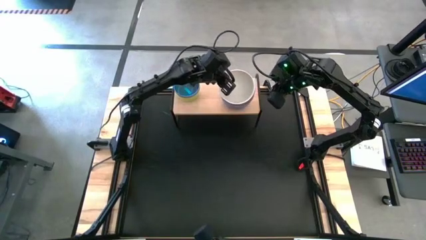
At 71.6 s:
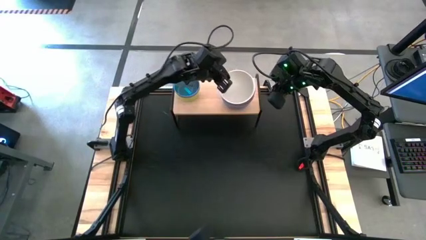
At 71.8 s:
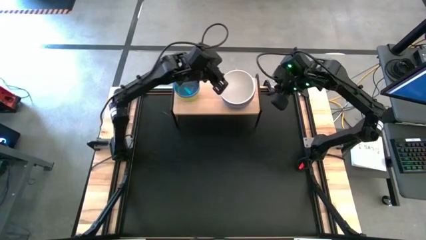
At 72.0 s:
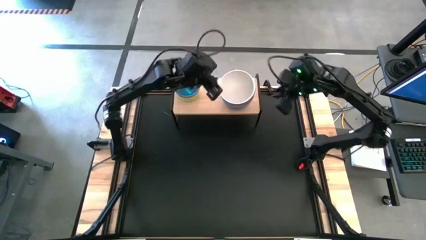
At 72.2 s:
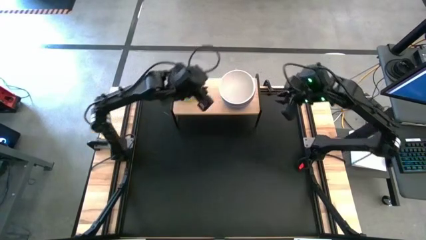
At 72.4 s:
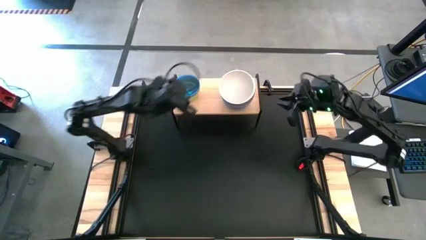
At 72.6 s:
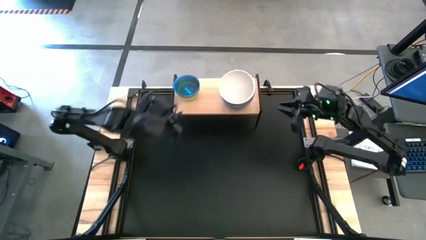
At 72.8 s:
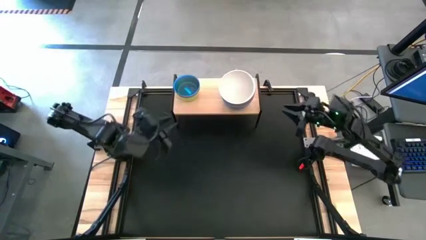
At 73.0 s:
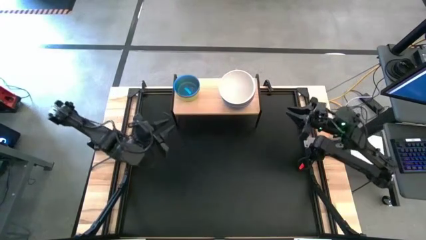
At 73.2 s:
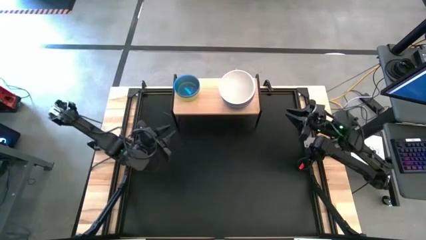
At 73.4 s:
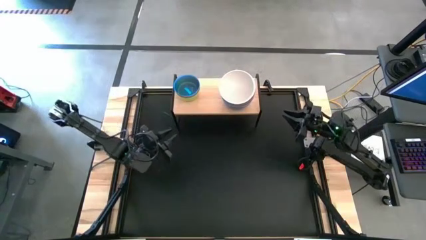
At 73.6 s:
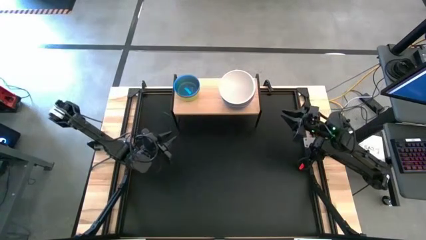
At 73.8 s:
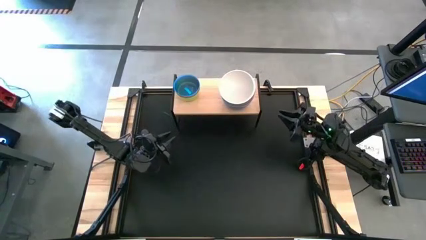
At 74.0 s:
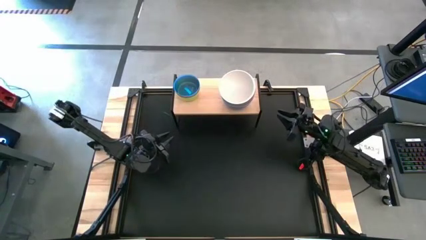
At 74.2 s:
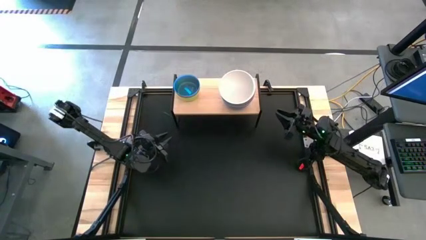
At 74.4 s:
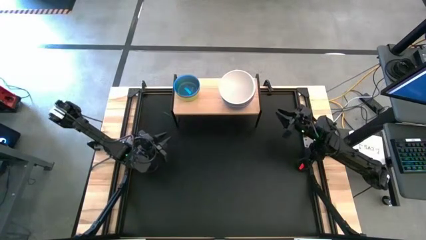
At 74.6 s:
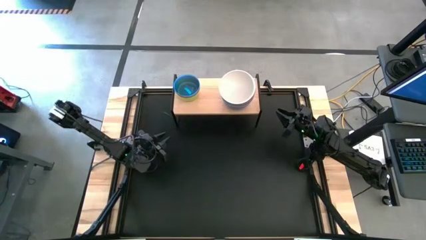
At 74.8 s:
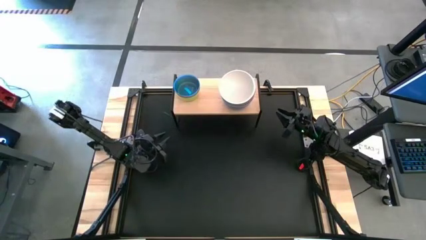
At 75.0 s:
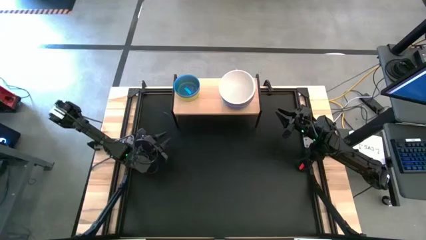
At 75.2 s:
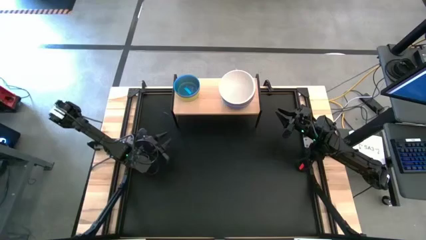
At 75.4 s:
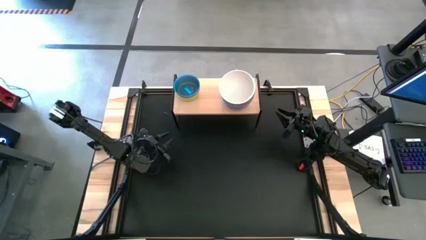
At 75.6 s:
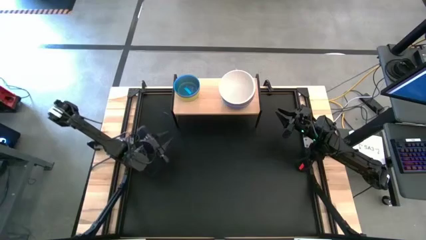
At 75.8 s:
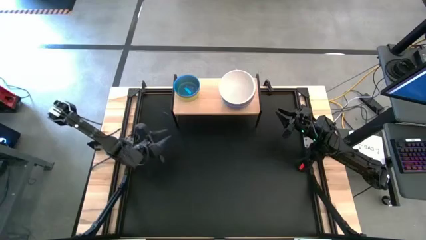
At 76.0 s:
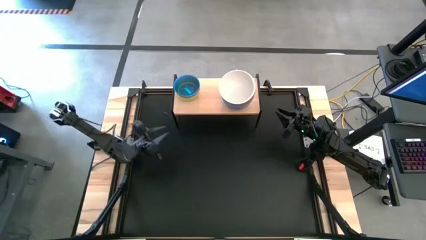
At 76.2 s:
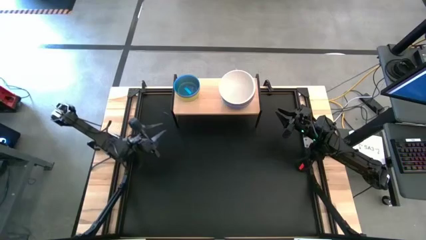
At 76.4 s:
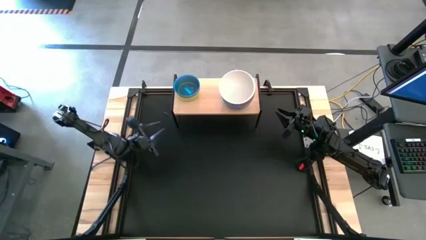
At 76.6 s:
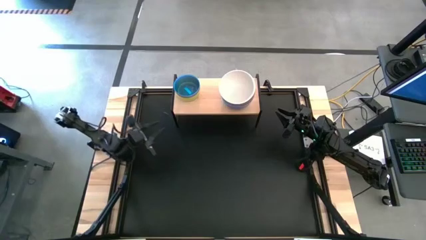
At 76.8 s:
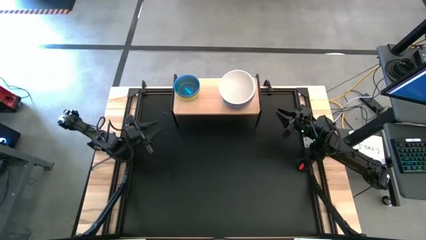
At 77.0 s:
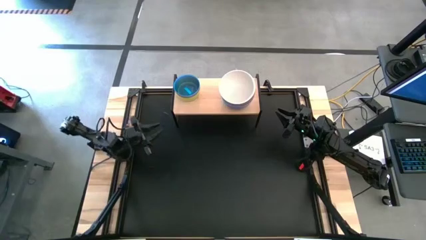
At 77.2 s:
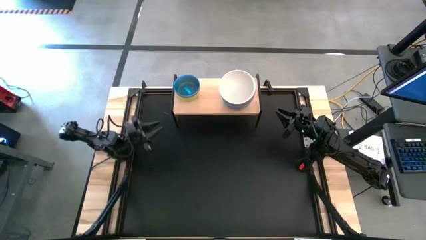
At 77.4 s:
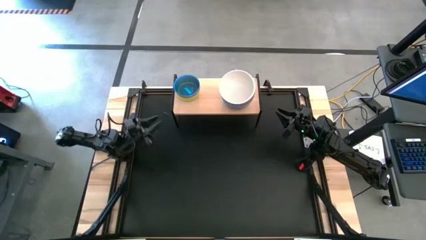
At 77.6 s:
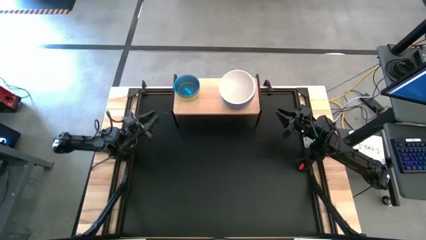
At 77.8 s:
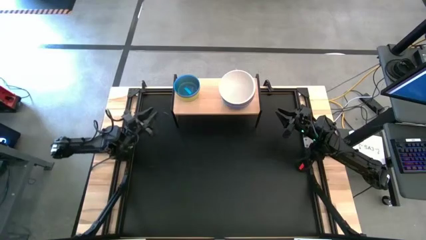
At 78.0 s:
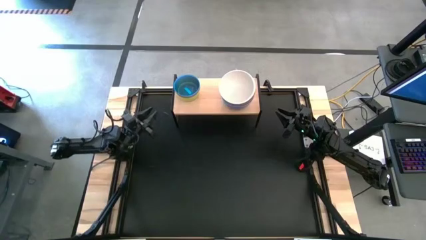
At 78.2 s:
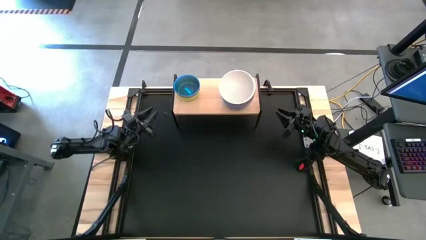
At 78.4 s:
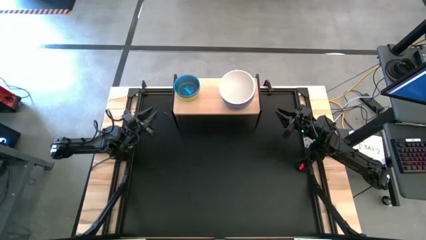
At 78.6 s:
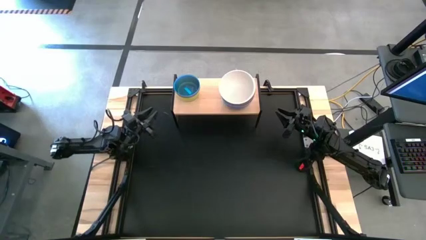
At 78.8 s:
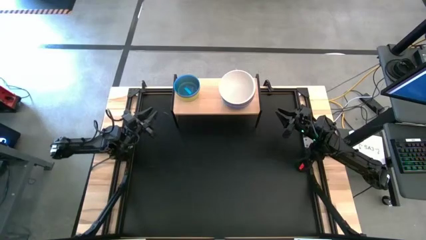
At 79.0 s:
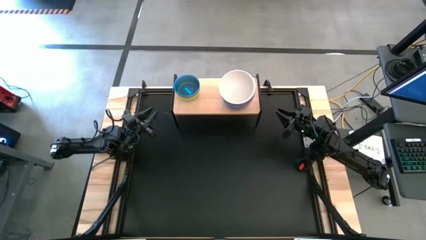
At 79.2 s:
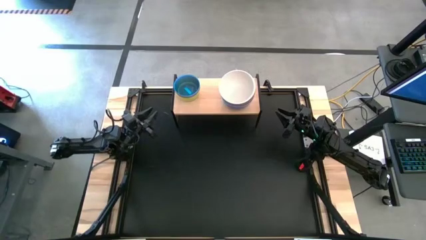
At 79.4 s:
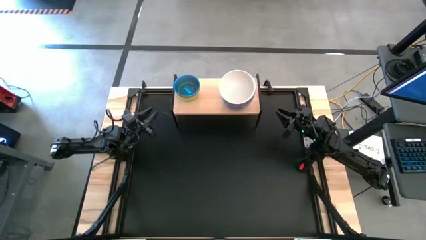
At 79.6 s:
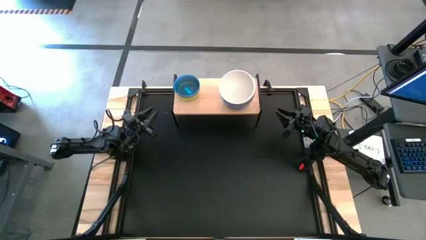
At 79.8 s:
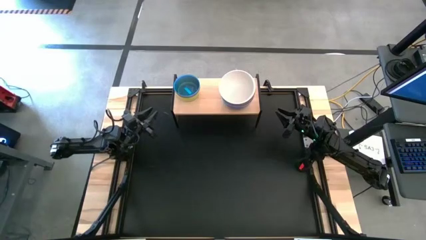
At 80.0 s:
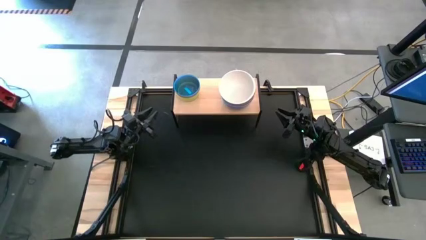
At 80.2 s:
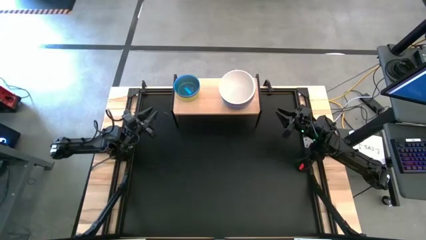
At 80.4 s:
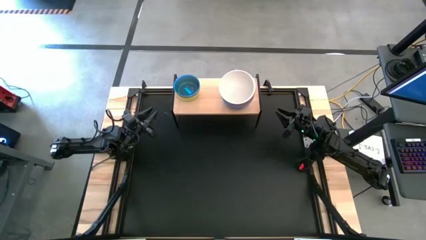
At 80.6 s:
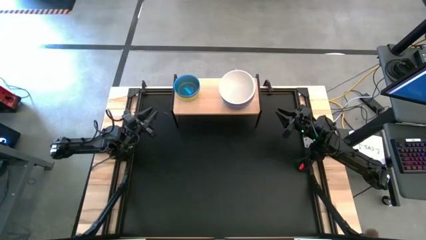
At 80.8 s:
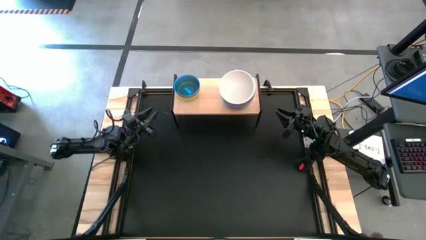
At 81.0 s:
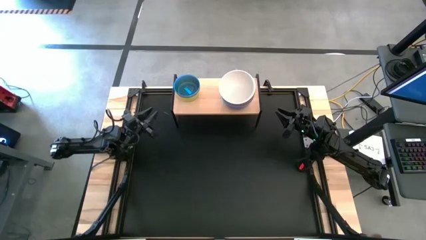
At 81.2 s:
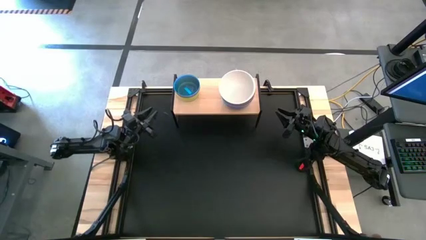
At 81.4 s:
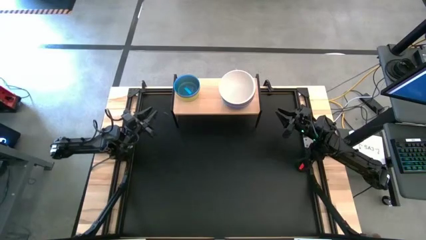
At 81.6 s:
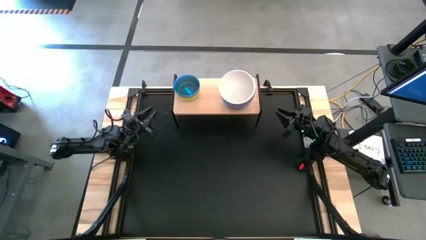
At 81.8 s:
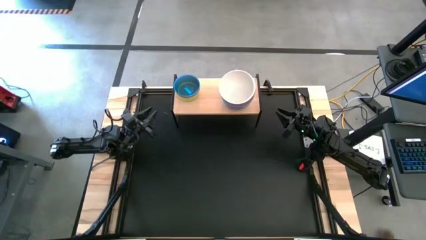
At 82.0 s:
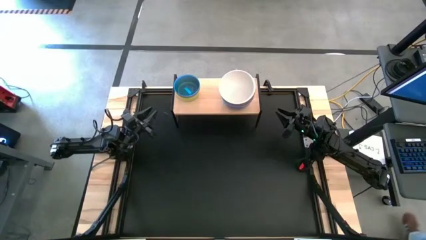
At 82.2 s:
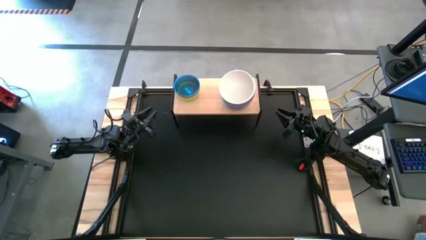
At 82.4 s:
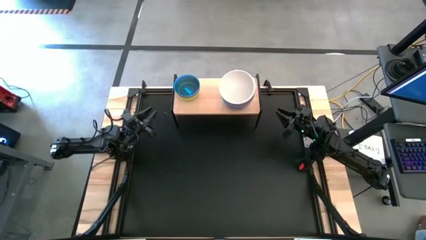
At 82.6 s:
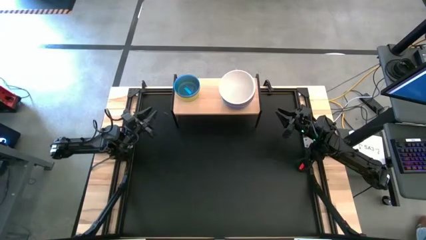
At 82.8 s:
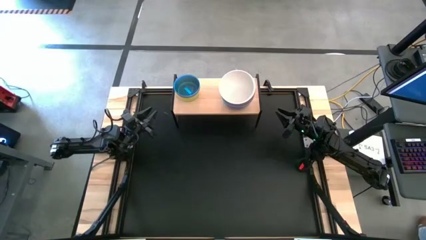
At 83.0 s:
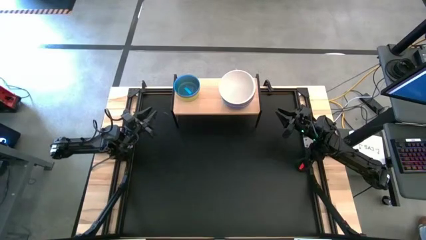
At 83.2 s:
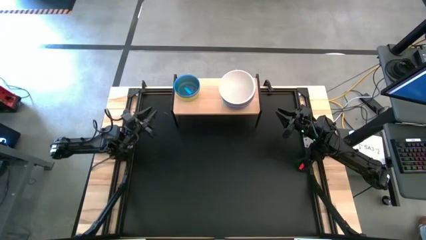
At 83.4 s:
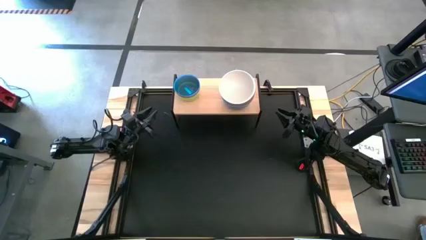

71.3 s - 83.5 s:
Task: Place and stack bowls onto a shelf
Return to Home Position
